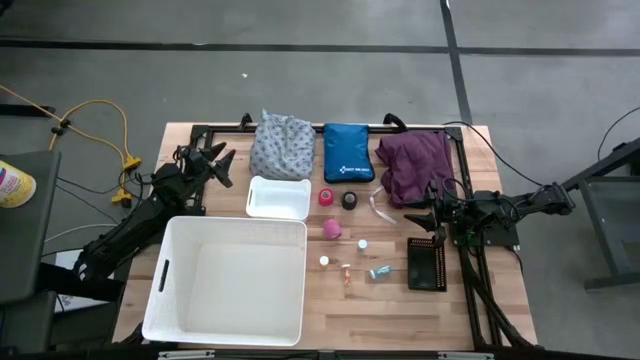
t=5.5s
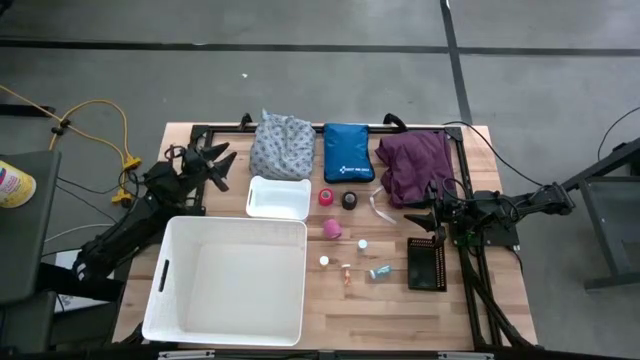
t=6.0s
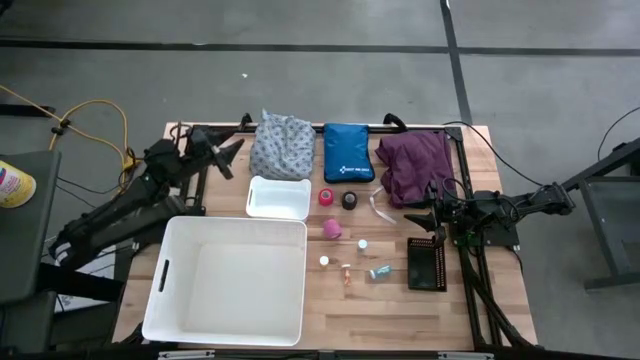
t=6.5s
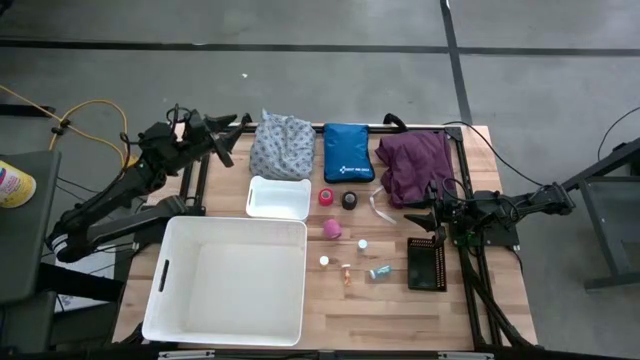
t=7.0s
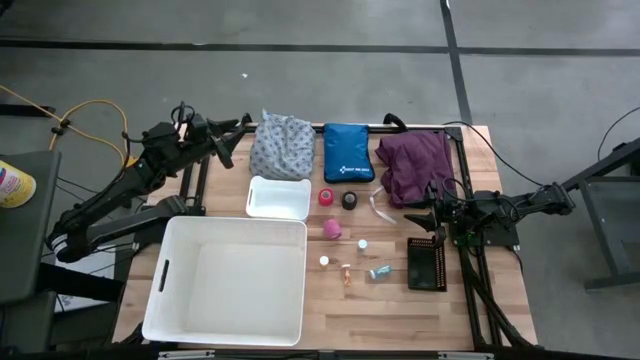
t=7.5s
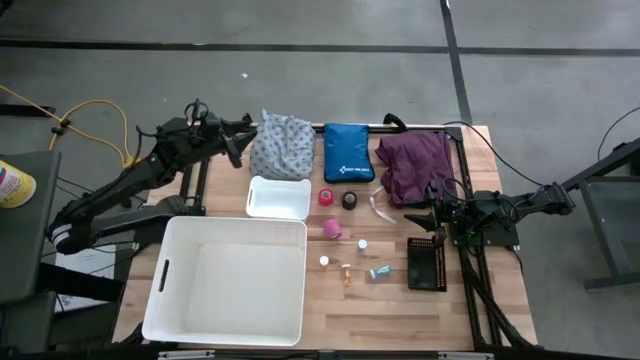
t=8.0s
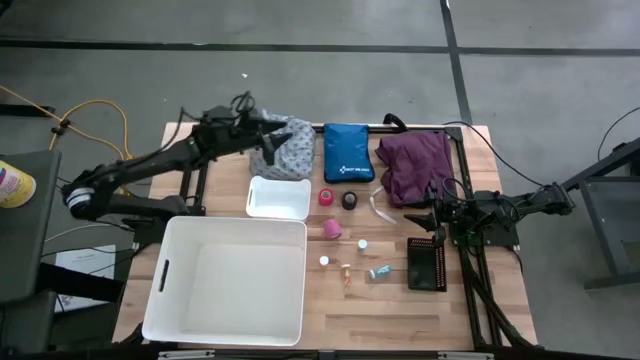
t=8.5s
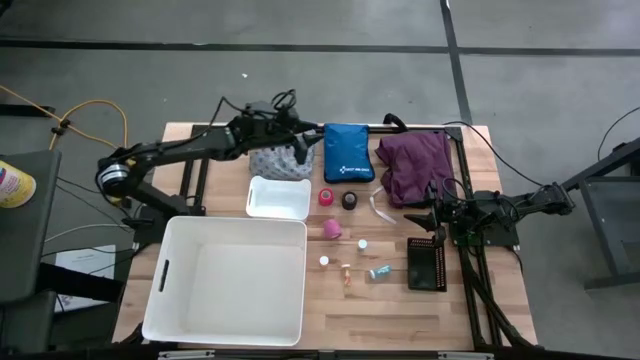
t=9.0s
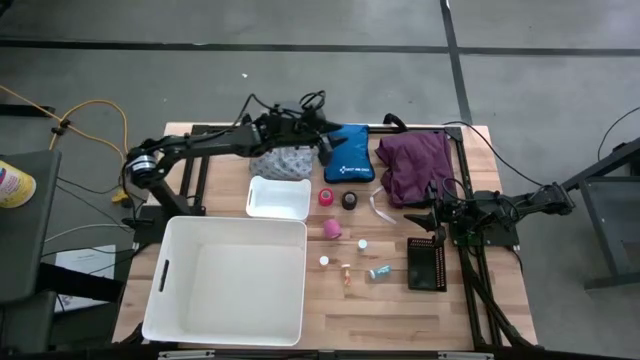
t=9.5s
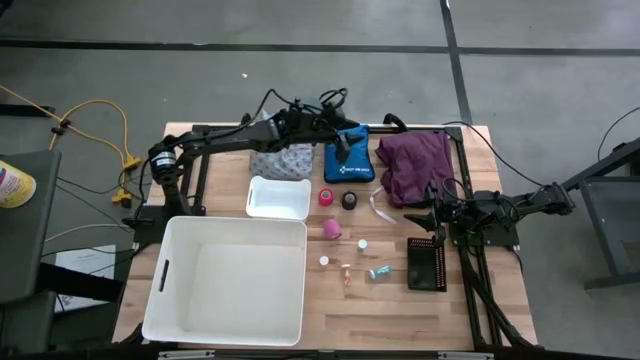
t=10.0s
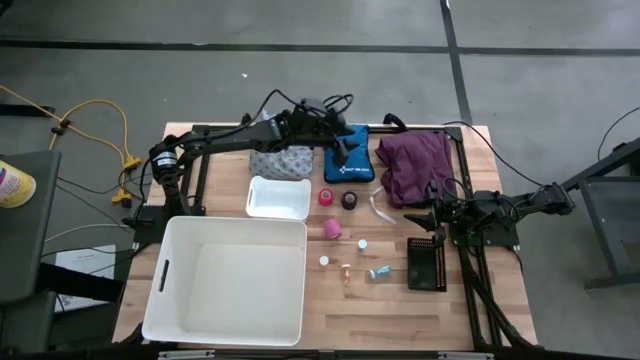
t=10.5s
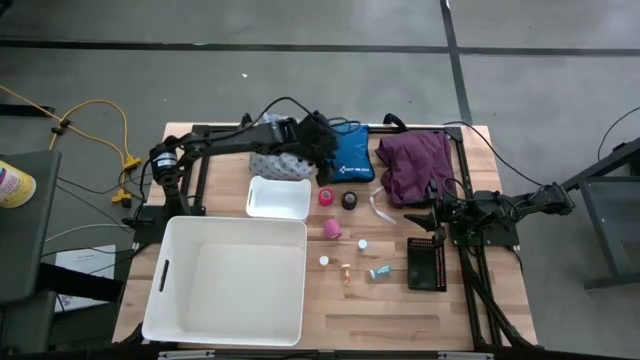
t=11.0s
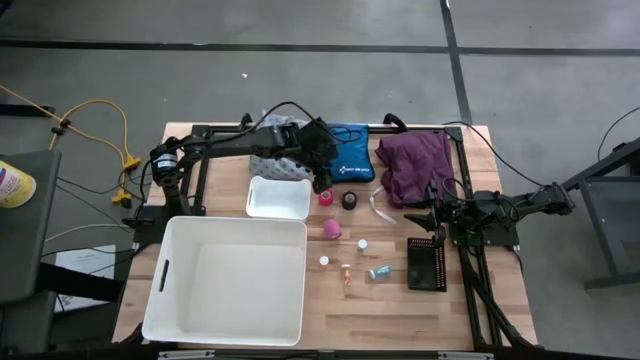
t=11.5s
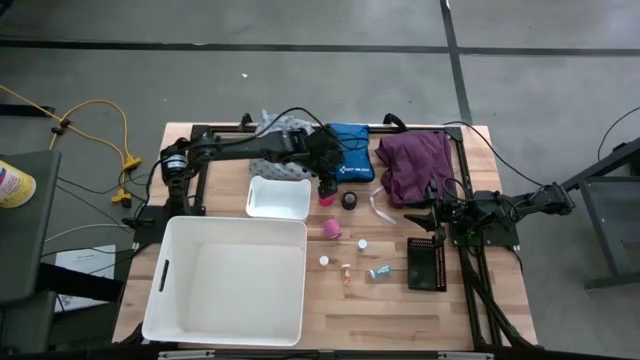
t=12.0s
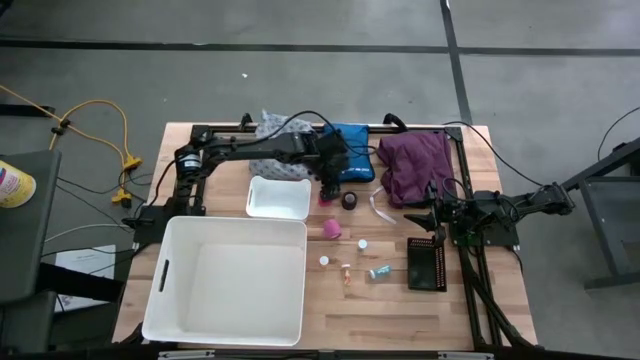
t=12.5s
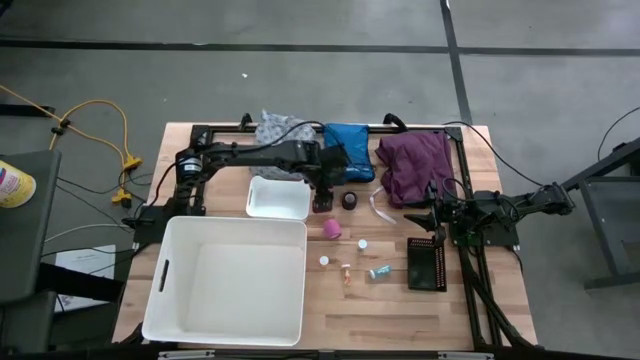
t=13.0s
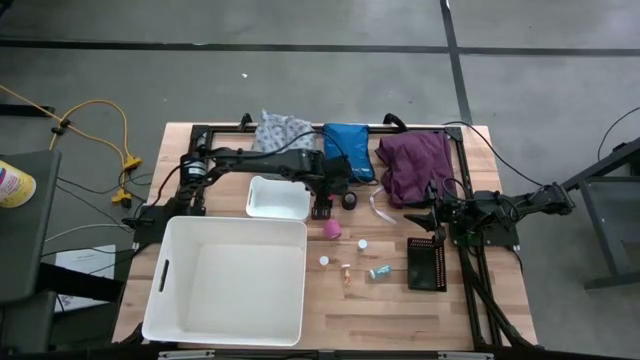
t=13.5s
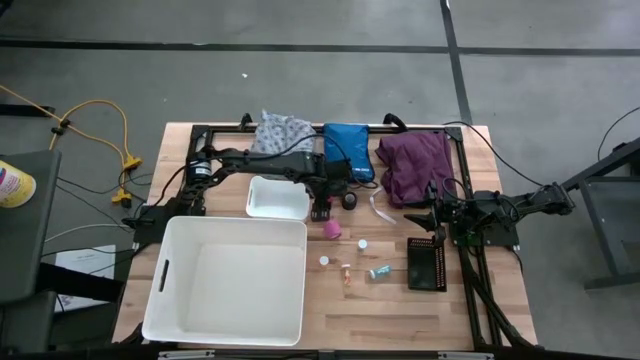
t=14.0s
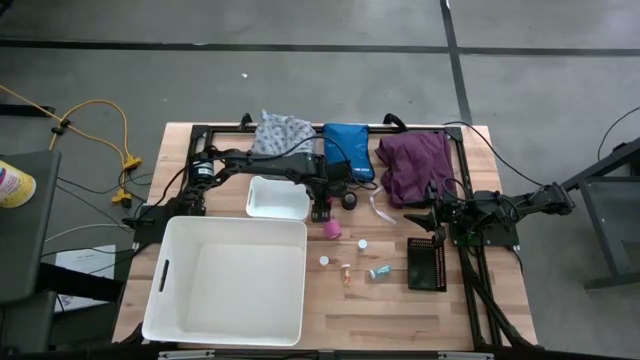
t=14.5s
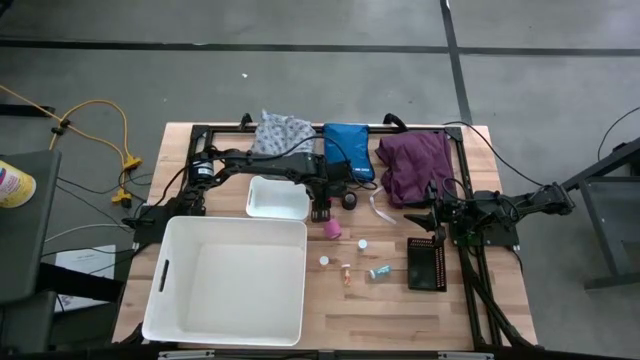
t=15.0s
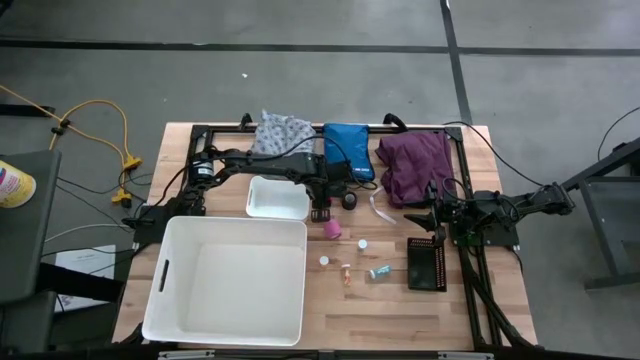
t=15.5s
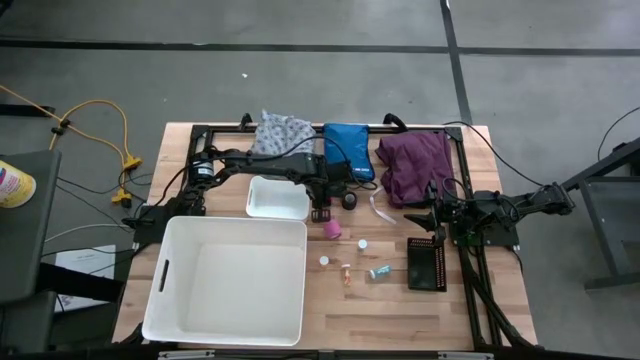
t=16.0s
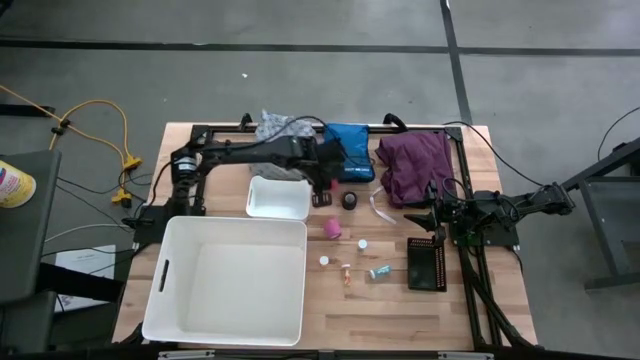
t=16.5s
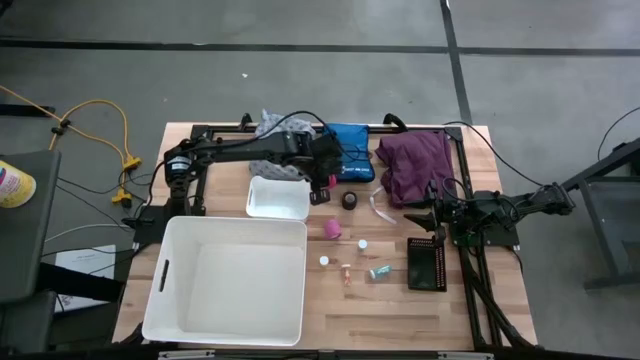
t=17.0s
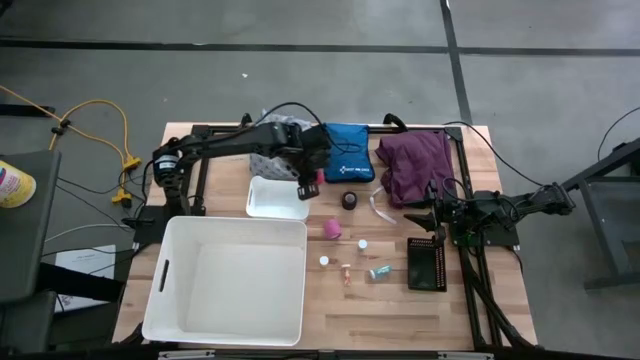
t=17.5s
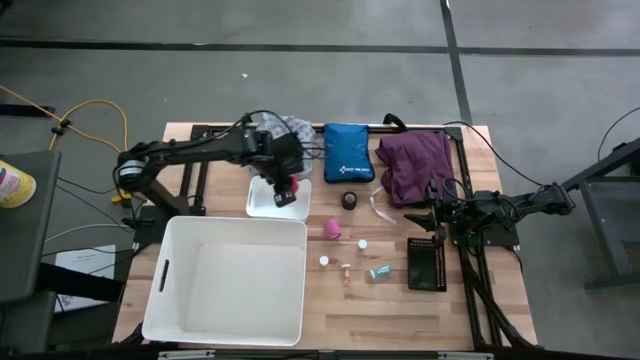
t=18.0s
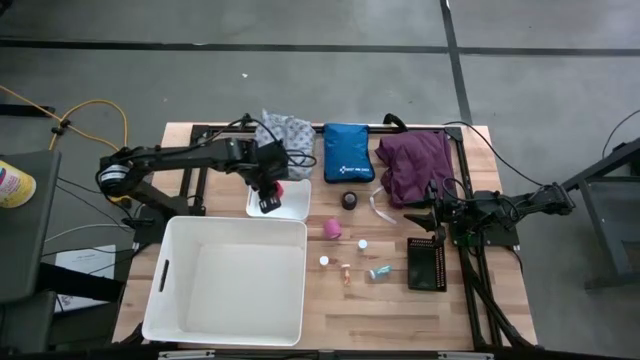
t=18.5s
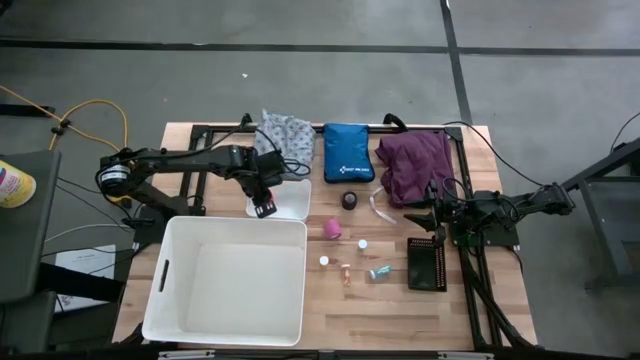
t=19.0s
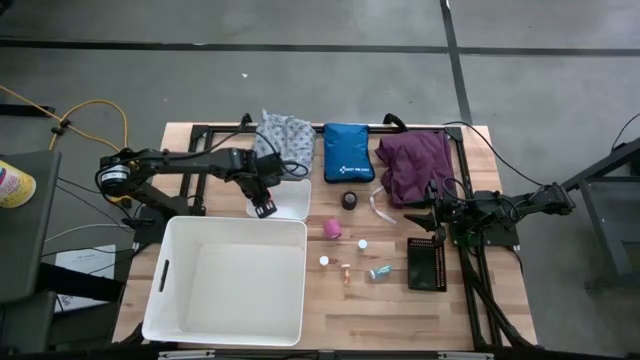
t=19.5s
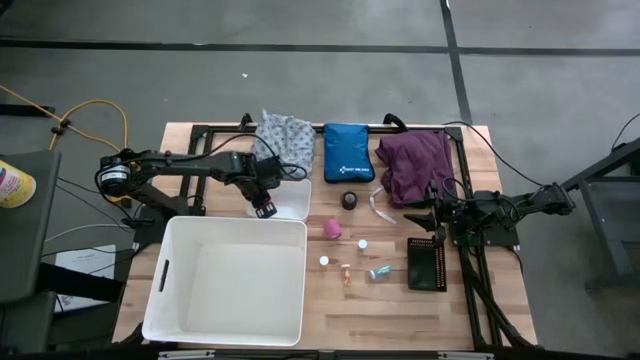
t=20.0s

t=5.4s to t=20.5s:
Task: Pick & place medical supplies in basket/bin
Put the red bandage into the white bin

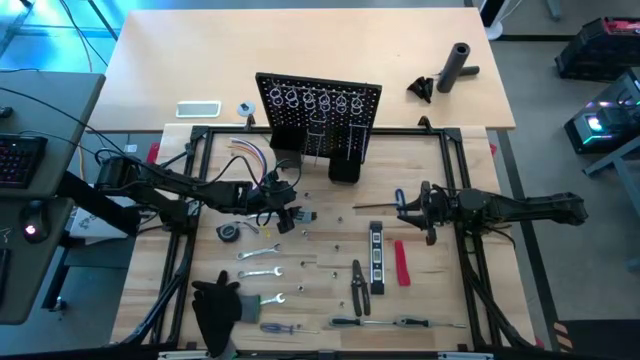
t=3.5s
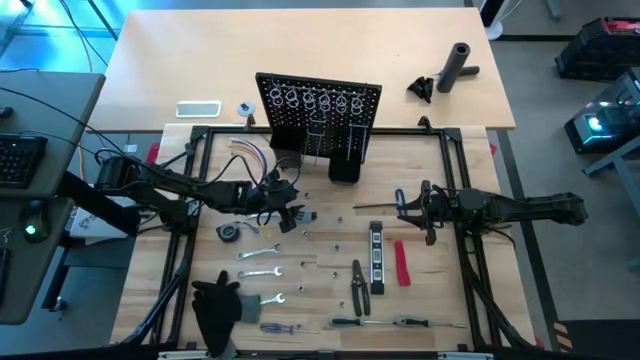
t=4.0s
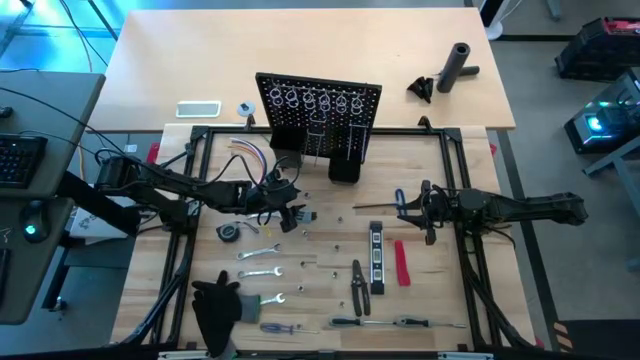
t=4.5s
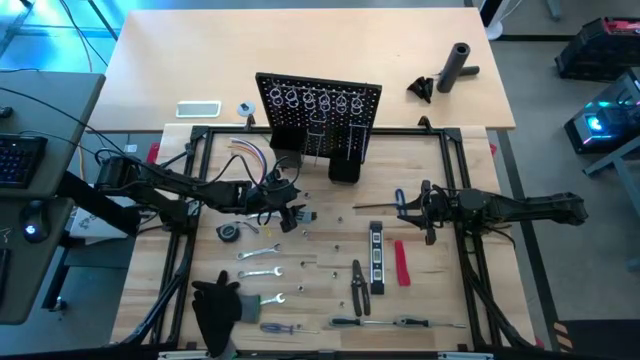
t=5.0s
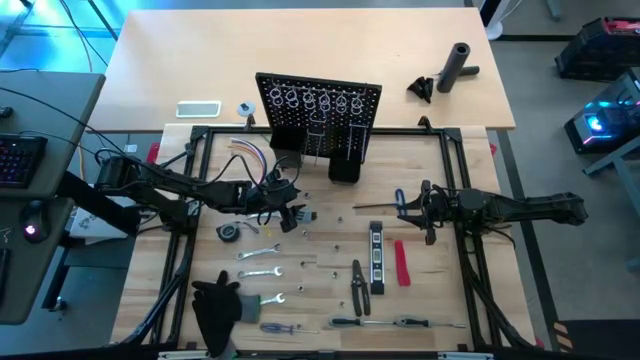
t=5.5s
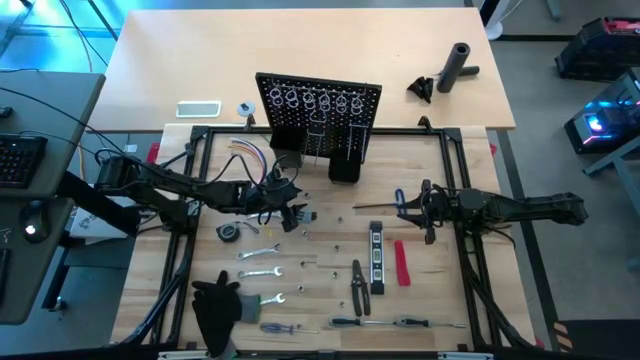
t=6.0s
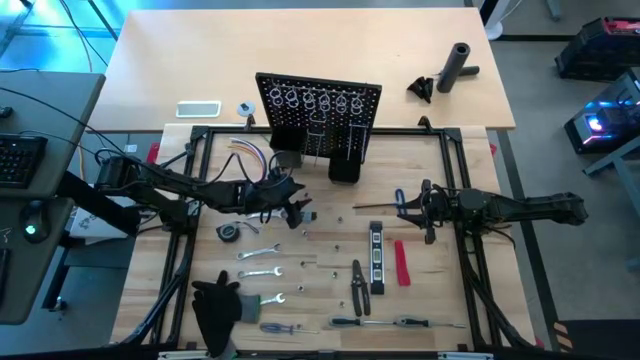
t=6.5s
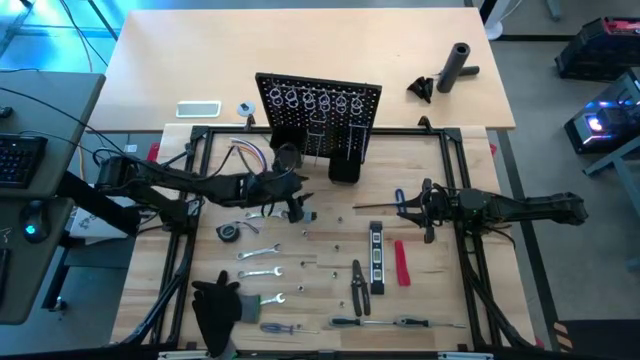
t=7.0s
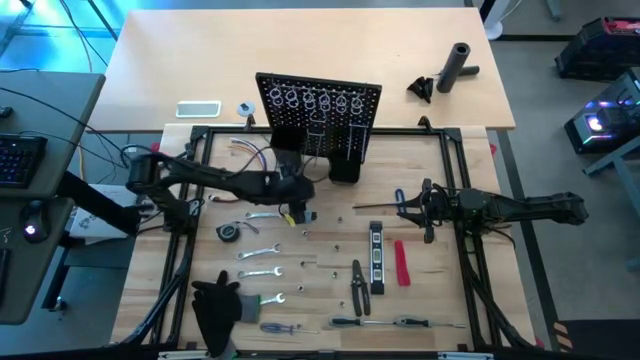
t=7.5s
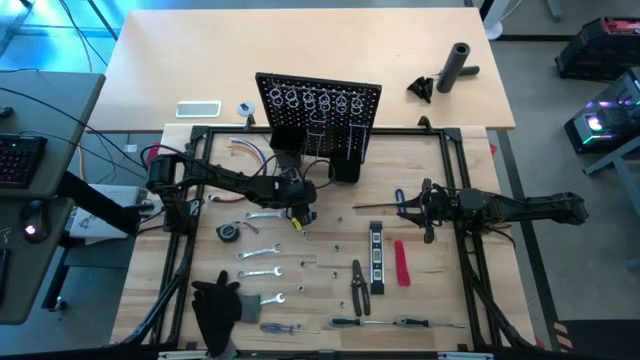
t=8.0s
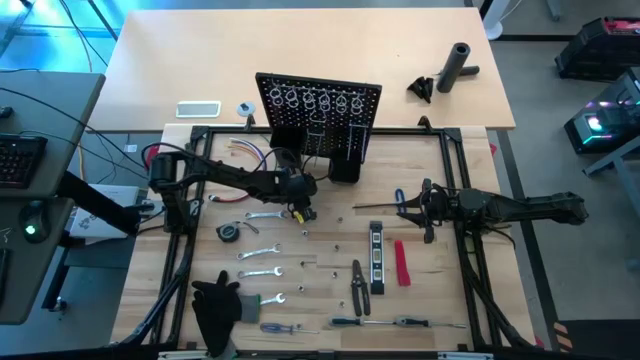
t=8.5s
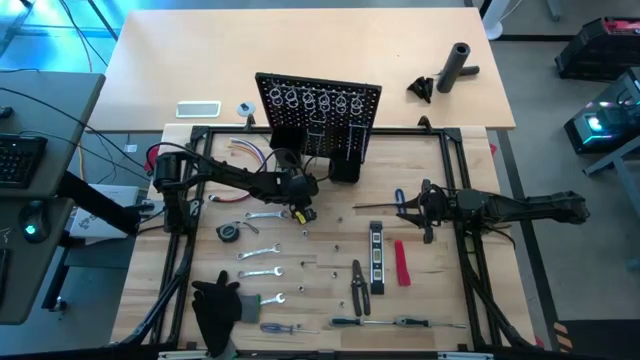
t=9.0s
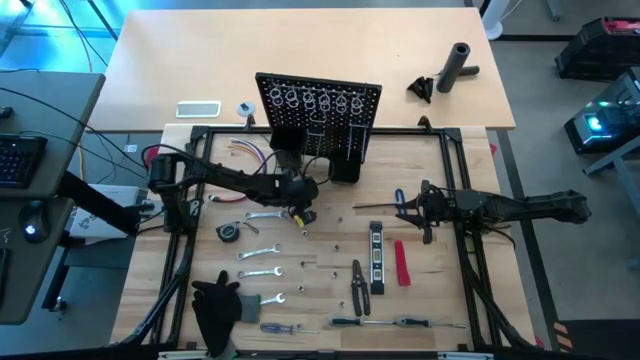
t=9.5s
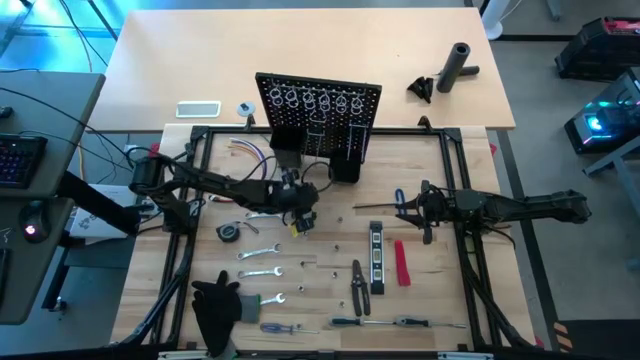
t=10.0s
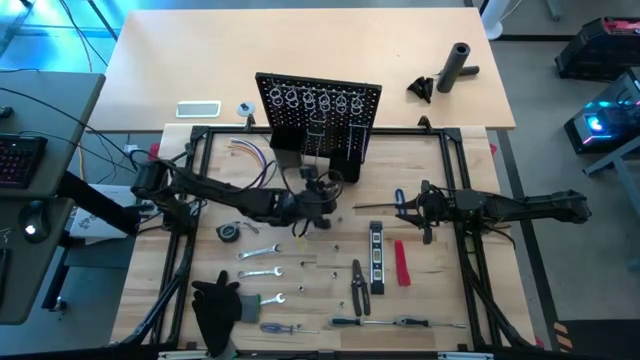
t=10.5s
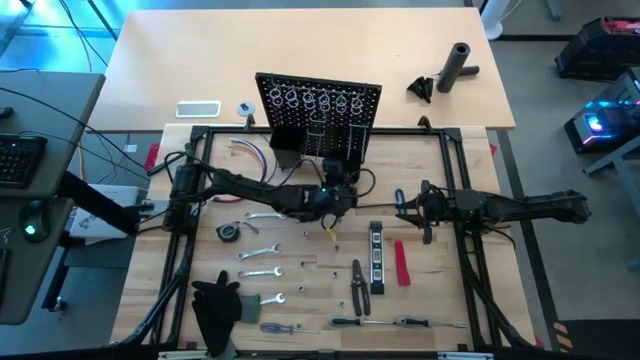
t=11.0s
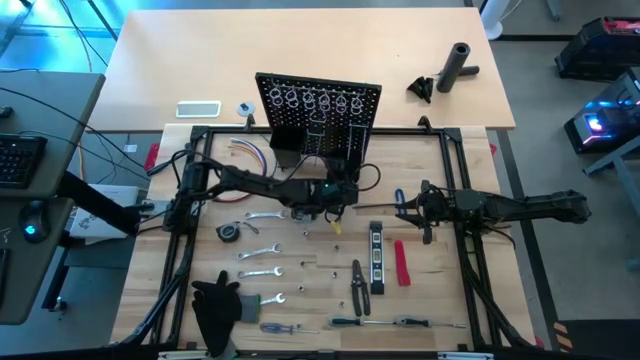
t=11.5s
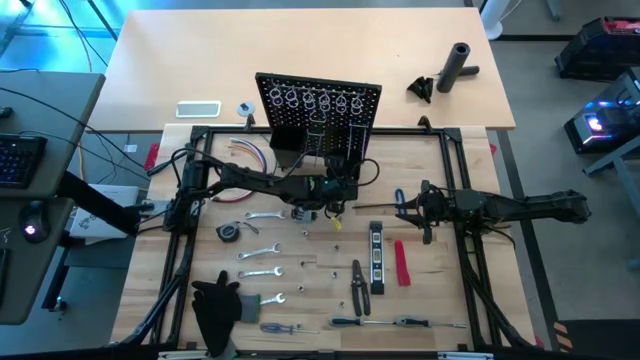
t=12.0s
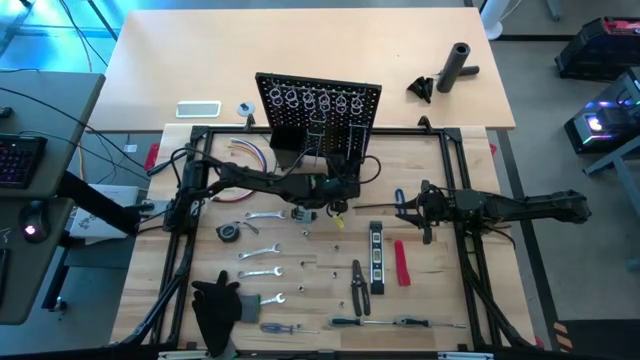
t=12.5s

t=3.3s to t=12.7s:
Task: Hang tools onto peg board
Put the socket into the small black bin on the black pegboard
